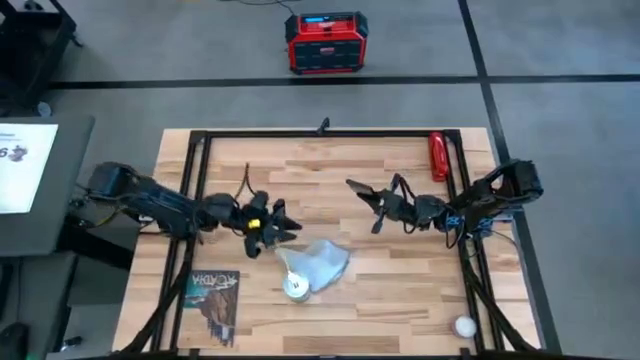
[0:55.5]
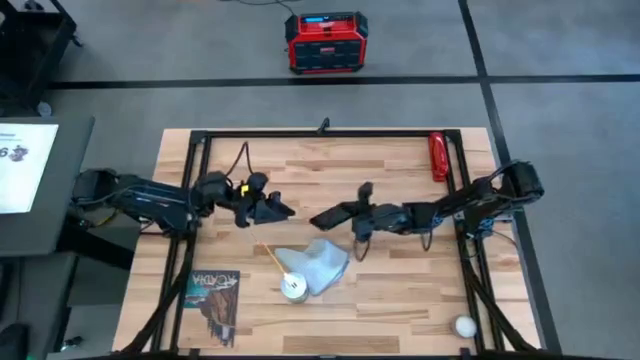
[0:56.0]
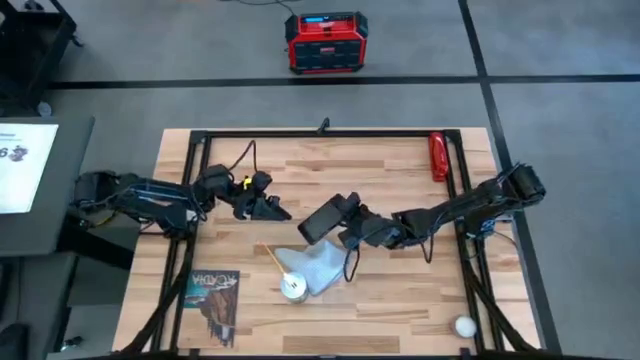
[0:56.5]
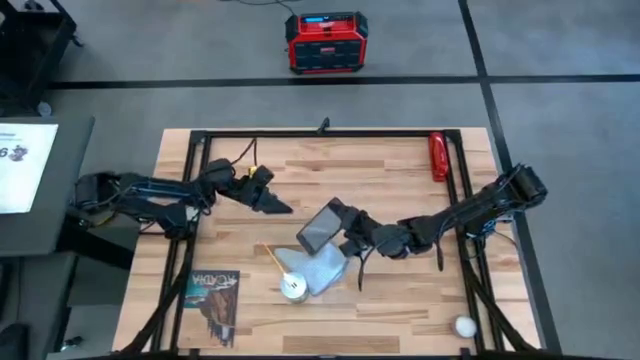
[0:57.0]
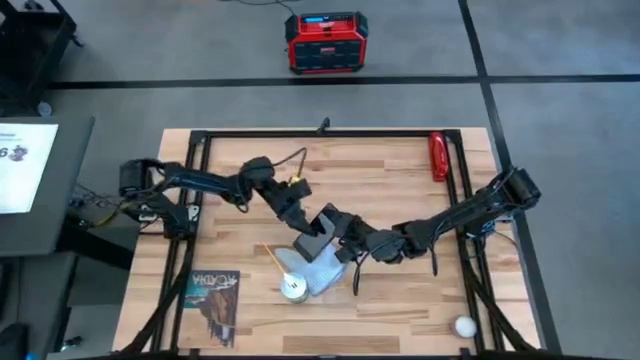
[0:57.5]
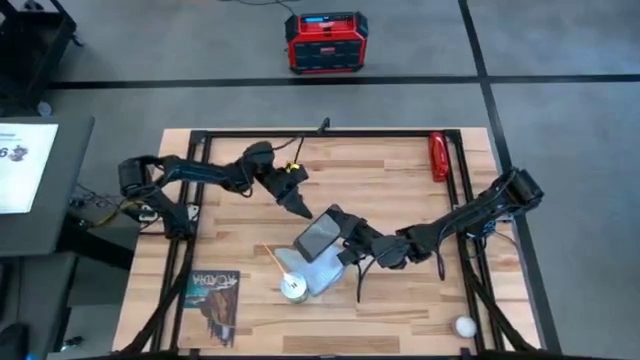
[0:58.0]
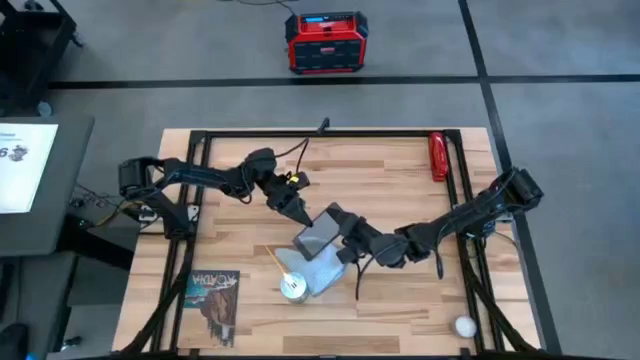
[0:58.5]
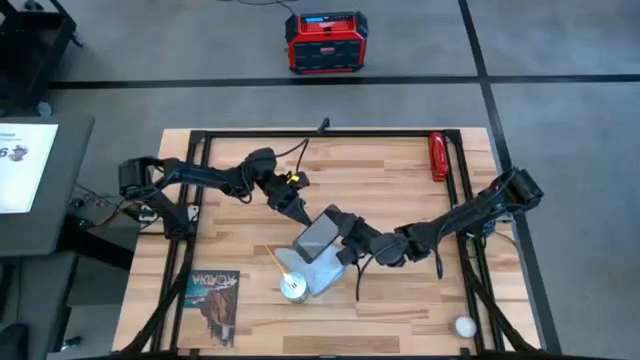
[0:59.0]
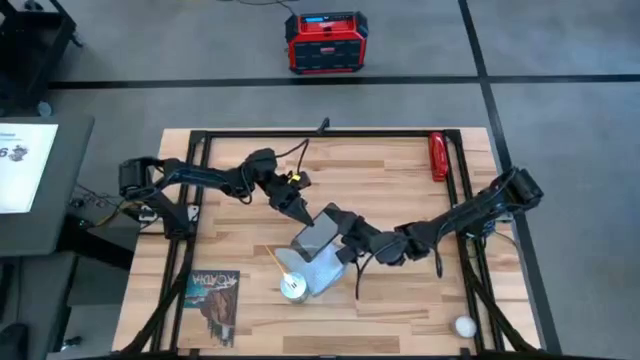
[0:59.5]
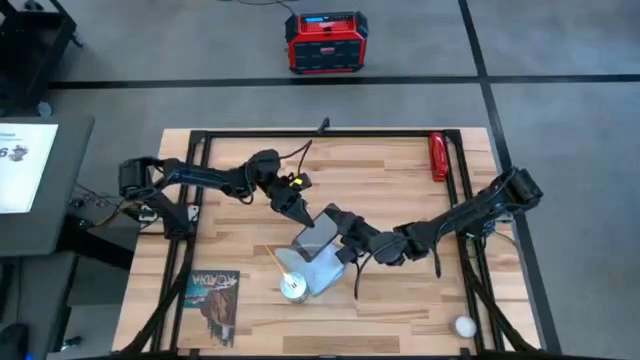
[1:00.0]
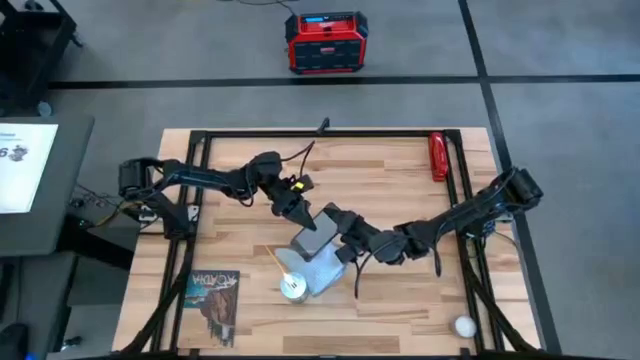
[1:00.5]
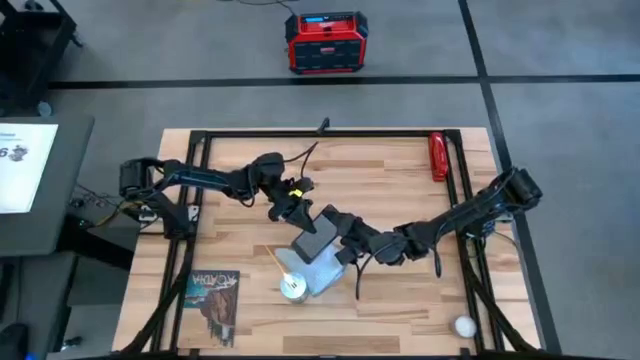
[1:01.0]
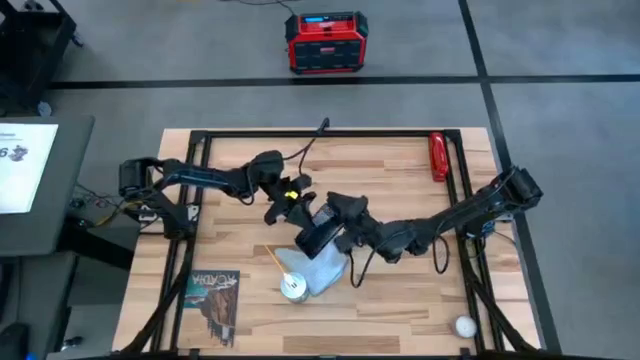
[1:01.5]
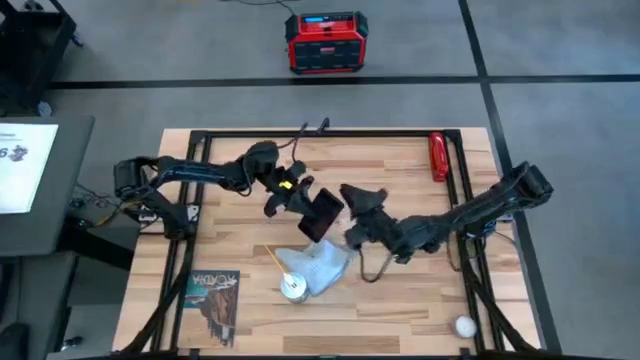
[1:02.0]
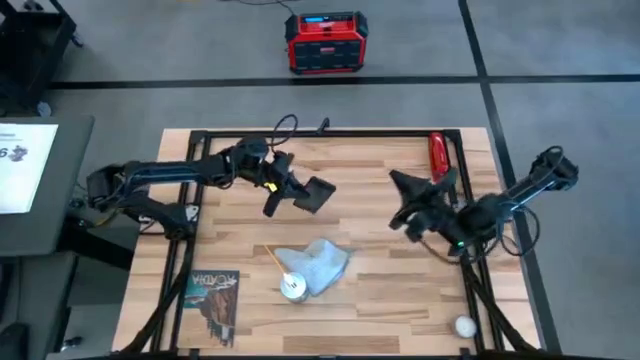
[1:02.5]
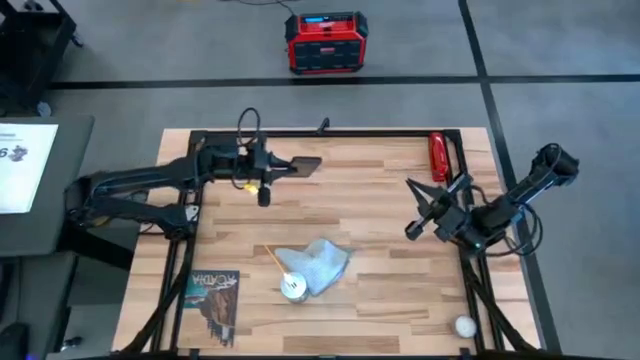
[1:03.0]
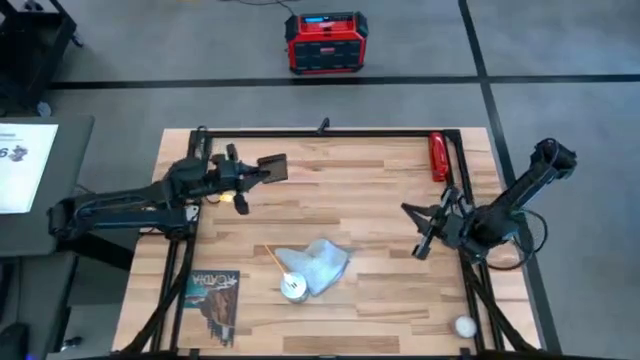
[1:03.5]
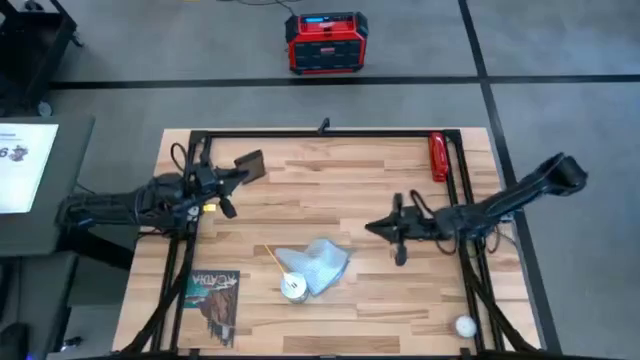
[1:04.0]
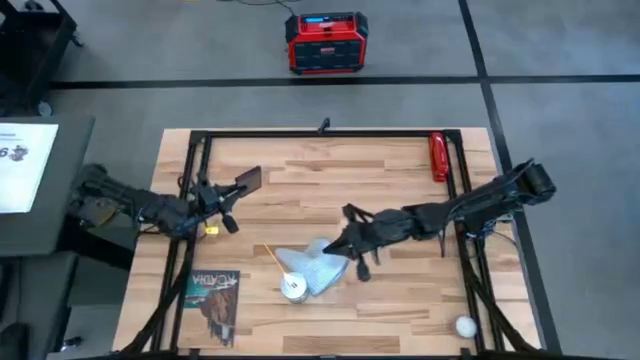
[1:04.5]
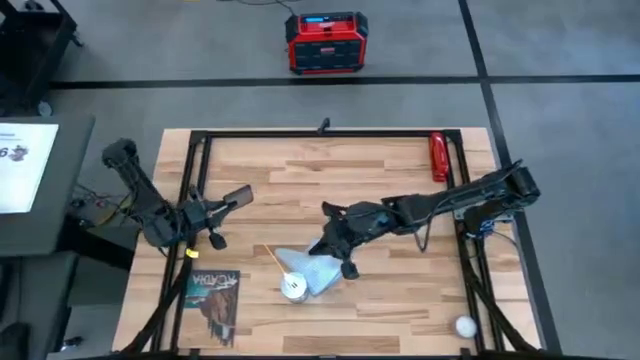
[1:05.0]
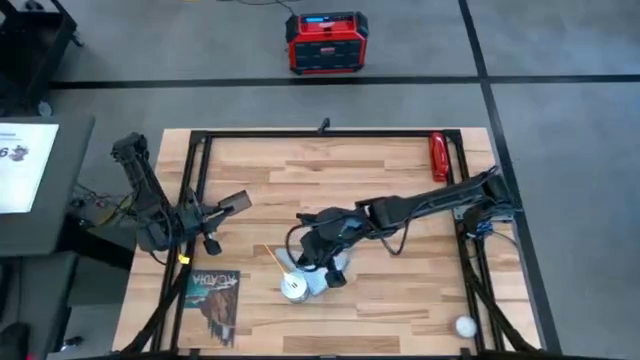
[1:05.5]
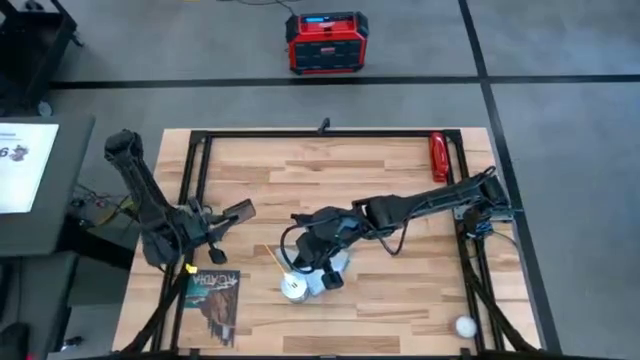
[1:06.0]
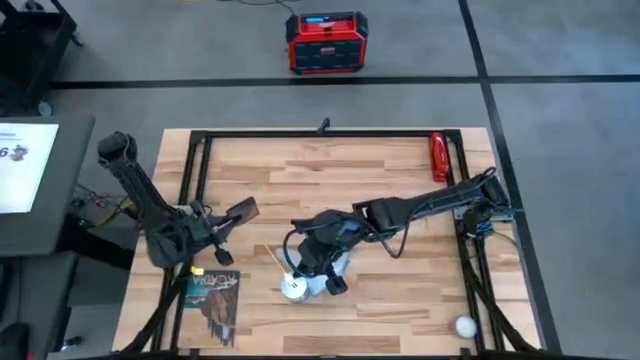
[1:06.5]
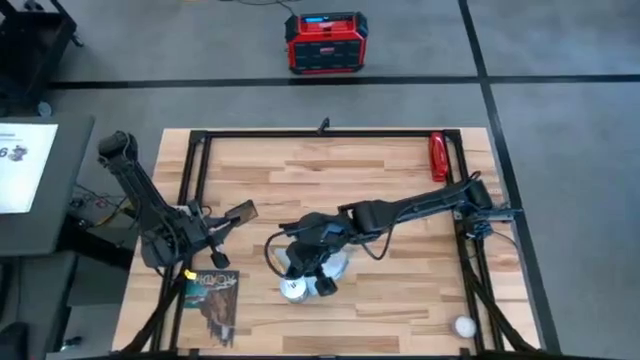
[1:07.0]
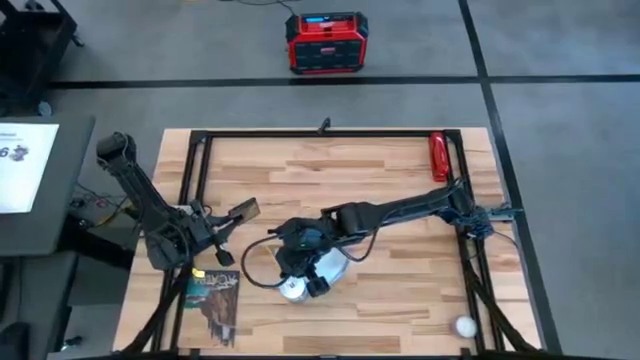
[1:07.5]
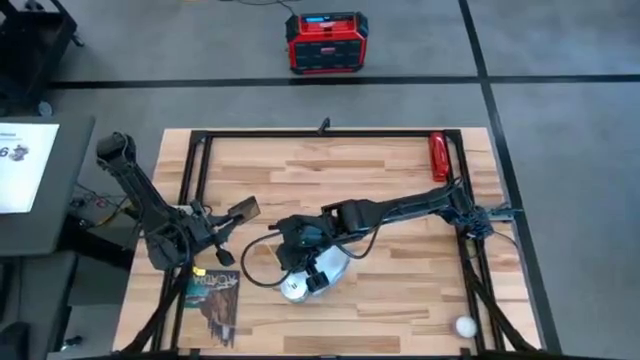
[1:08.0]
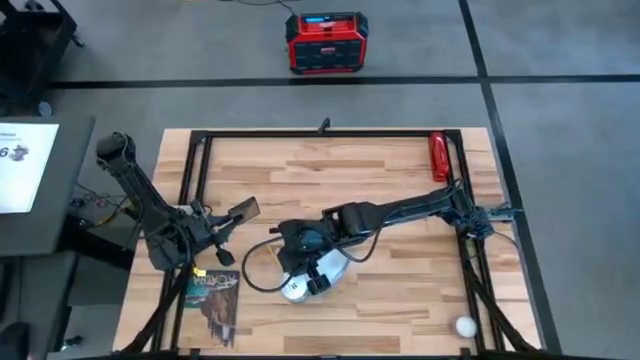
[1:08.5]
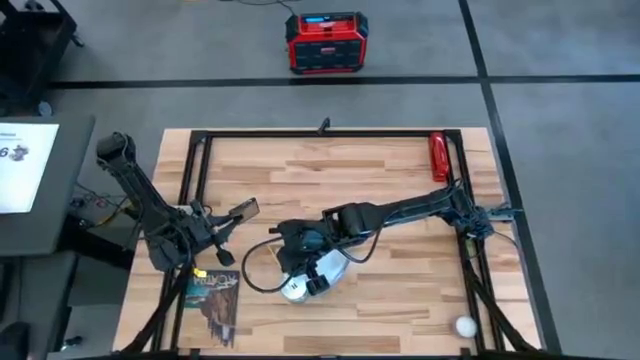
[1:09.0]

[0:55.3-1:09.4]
Task: Apply microfiber cloth
Spray the front of the cellphone using the spray bottle

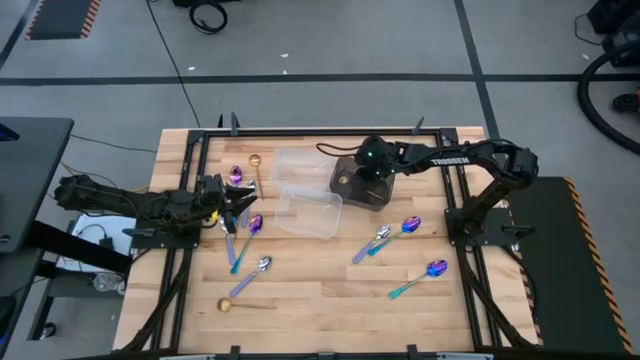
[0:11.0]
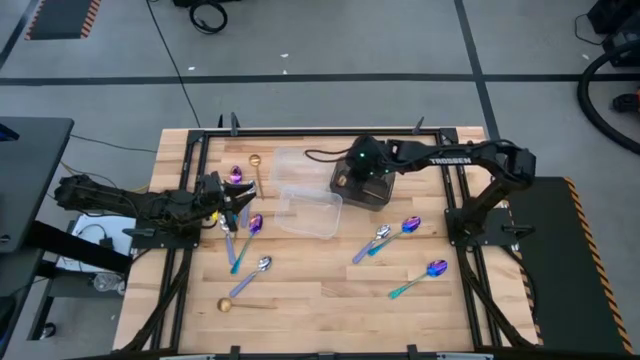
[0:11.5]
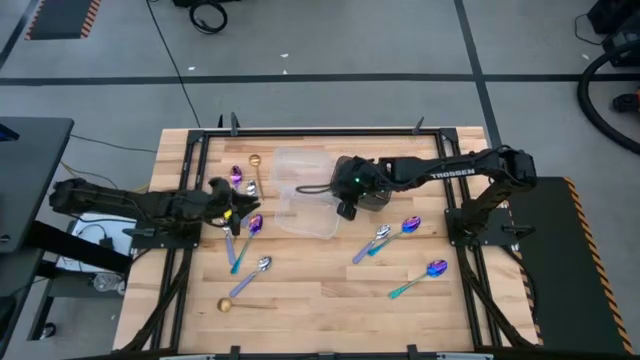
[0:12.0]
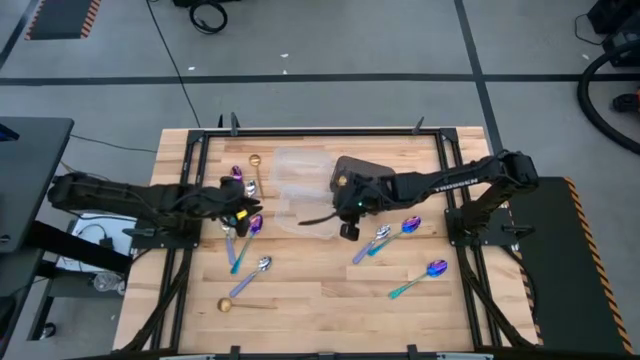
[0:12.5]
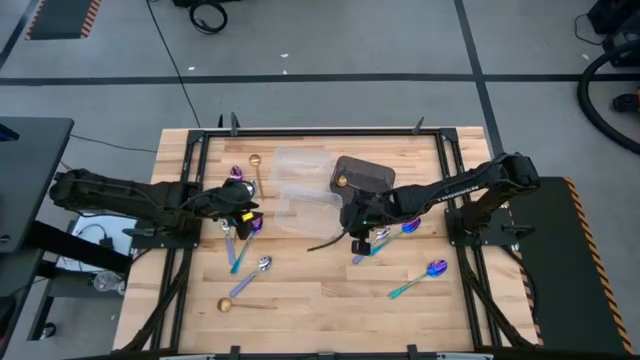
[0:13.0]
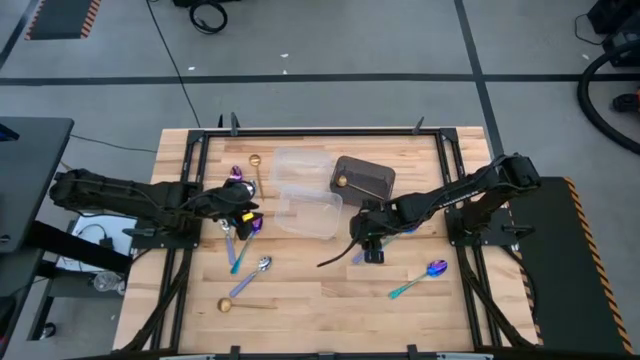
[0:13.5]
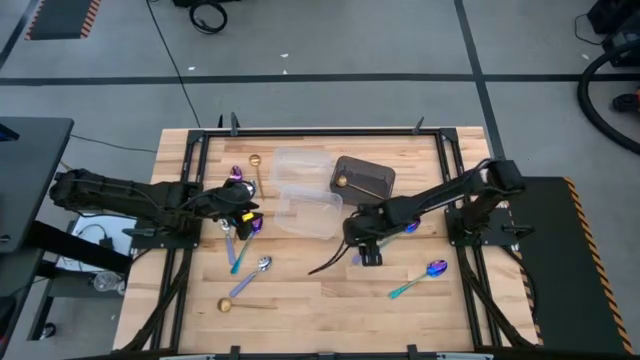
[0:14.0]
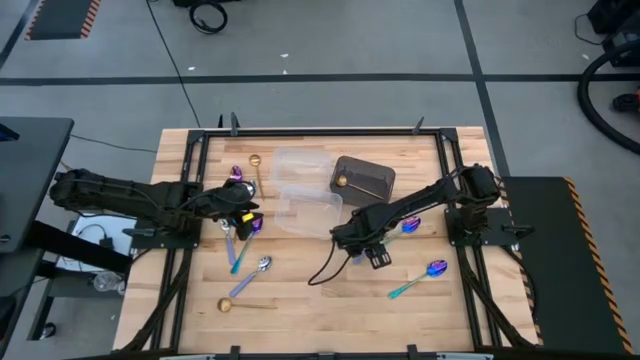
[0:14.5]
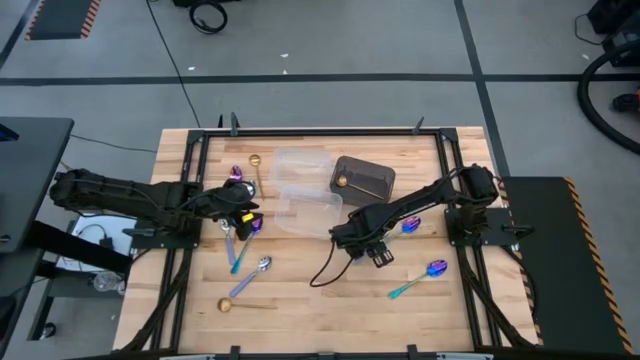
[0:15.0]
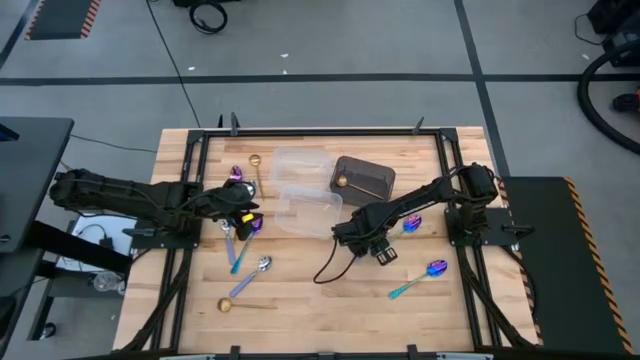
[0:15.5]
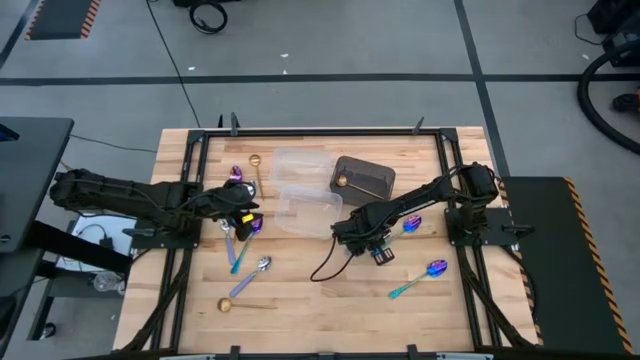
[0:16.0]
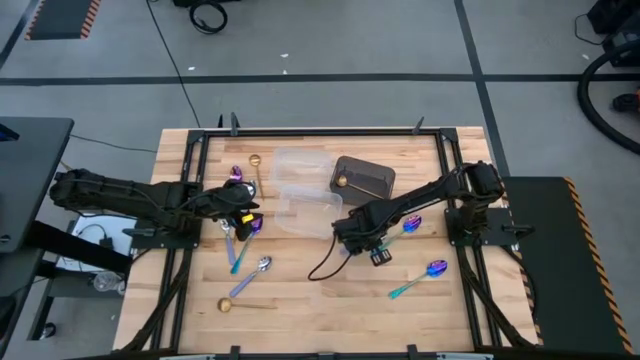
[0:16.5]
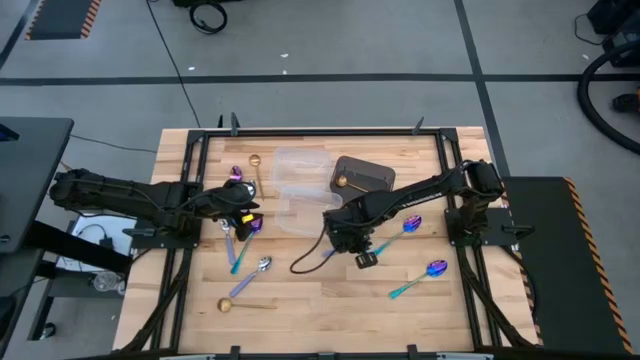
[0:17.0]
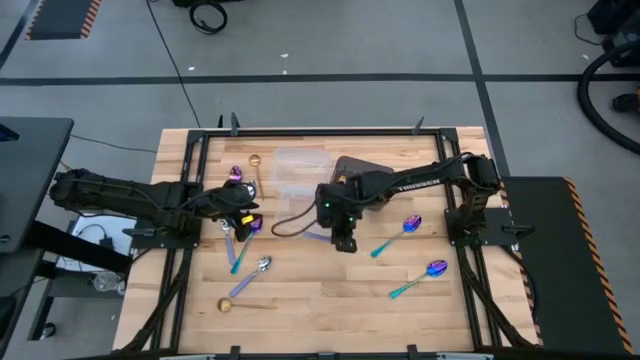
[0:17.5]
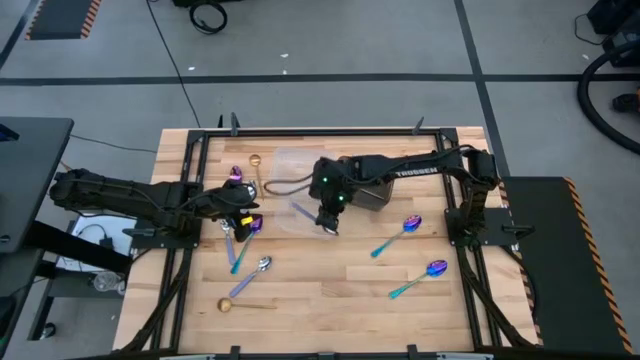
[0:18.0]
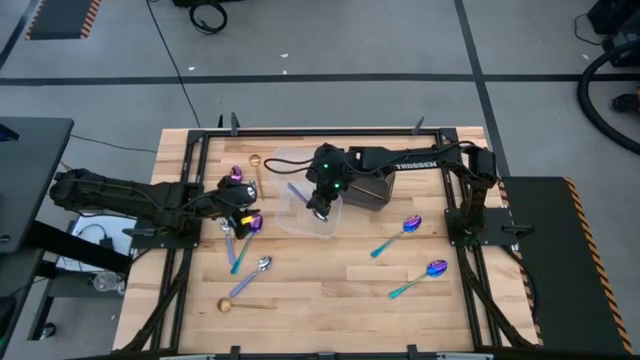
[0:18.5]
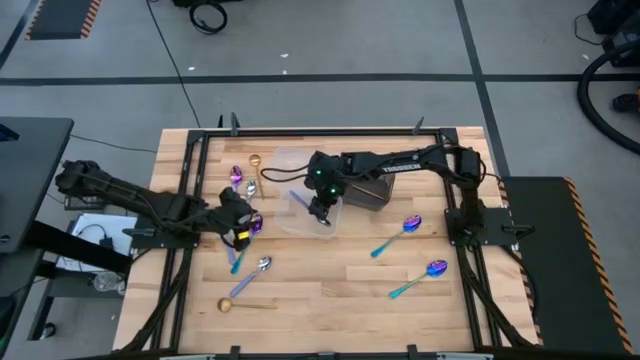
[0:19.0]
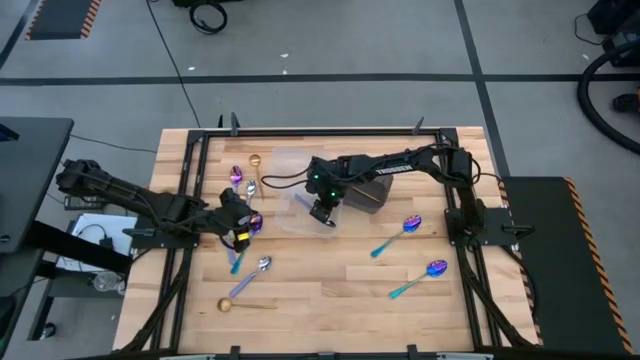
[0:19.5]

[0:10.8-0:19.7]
Task: Sort silverware by color (type)
Put the purple spoon into the bottom transparent bin
